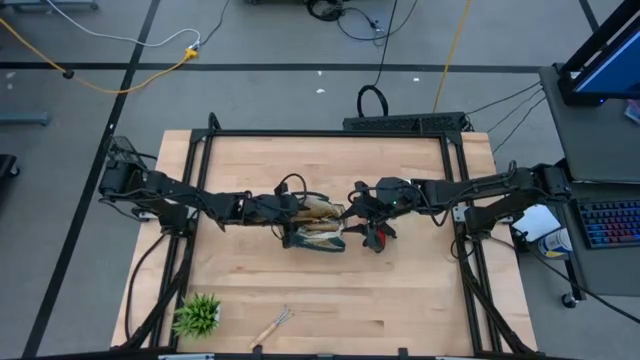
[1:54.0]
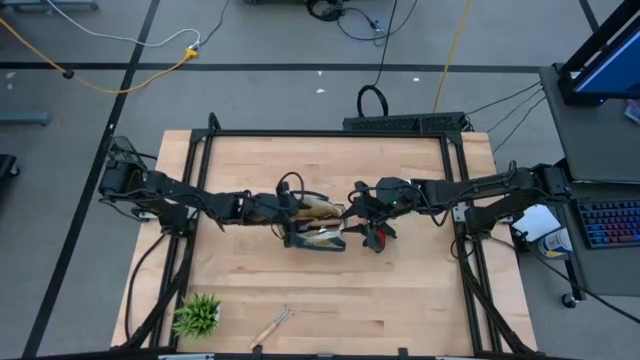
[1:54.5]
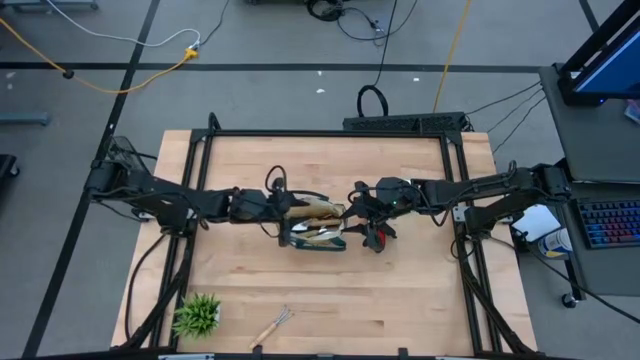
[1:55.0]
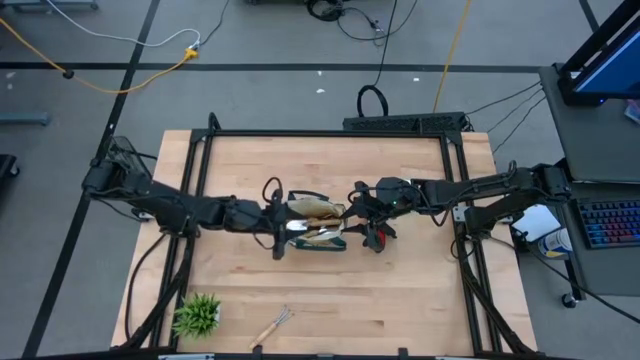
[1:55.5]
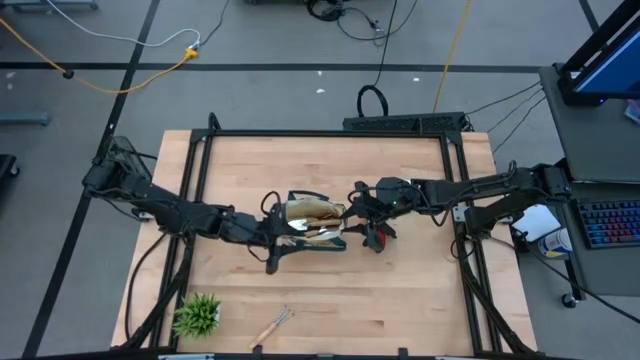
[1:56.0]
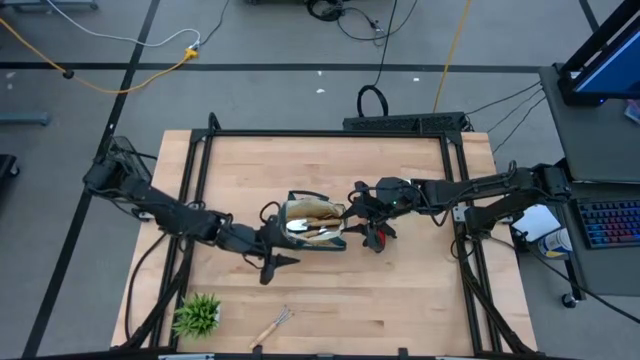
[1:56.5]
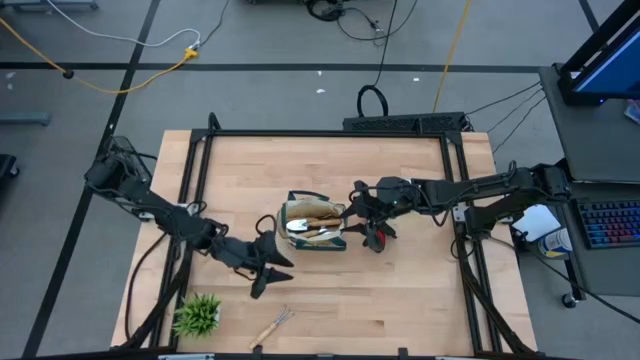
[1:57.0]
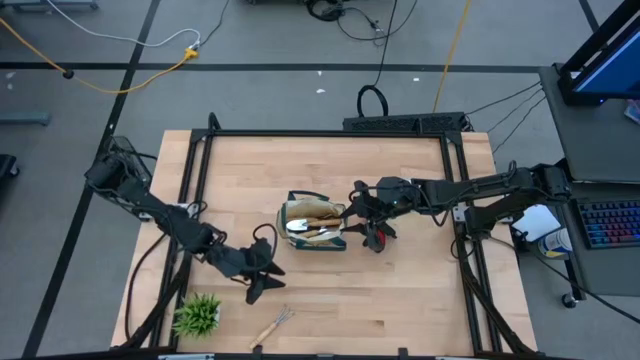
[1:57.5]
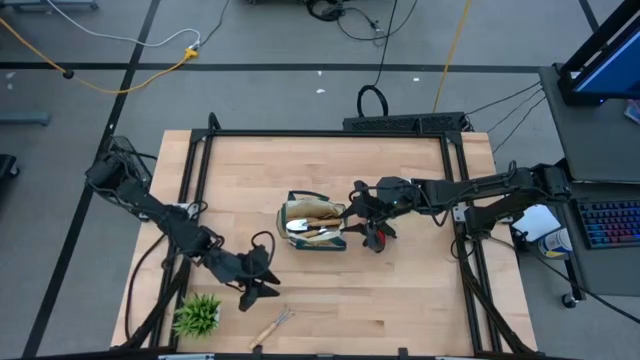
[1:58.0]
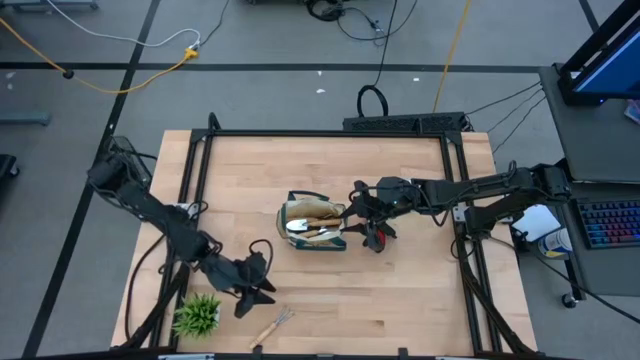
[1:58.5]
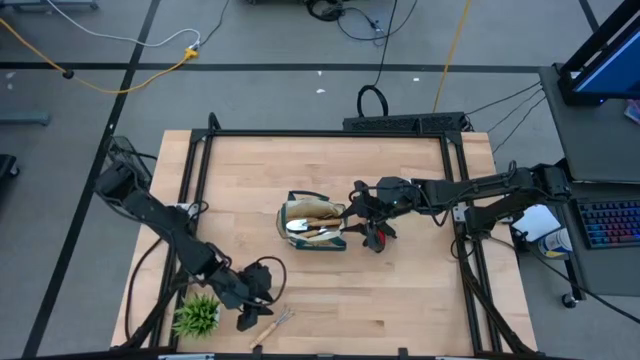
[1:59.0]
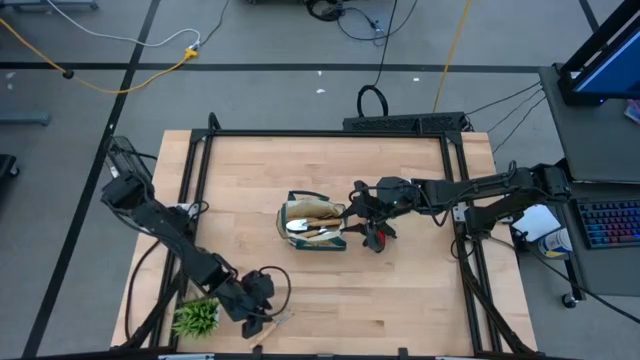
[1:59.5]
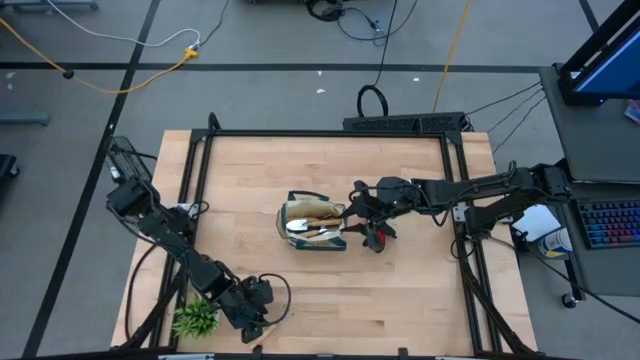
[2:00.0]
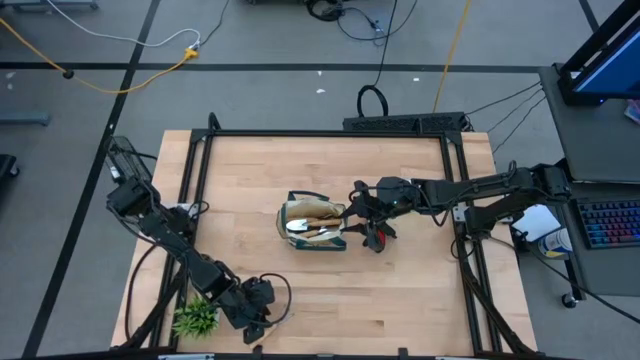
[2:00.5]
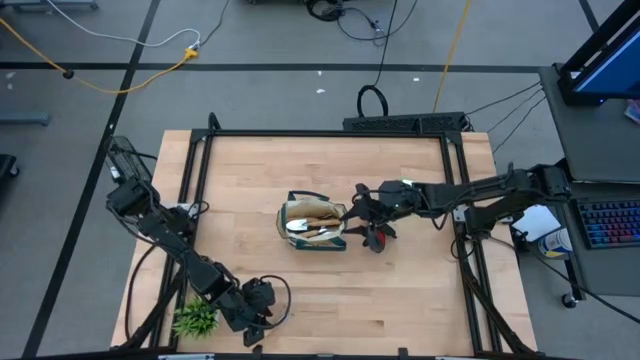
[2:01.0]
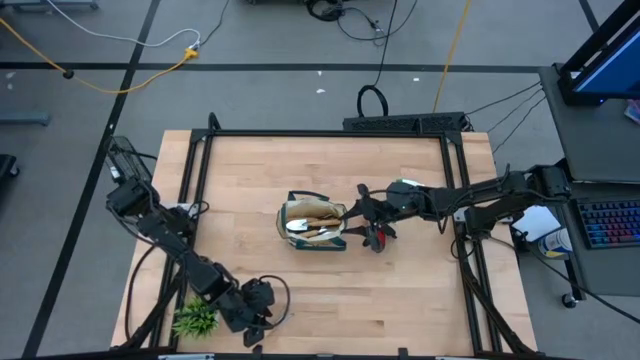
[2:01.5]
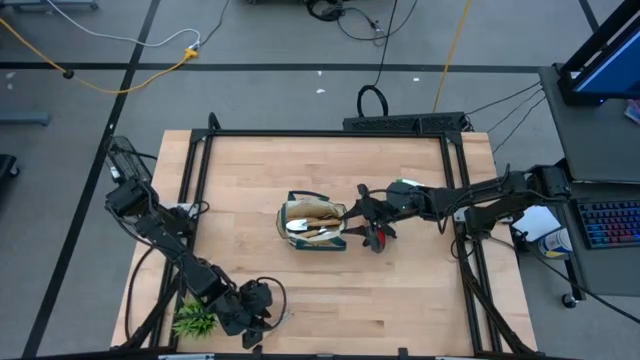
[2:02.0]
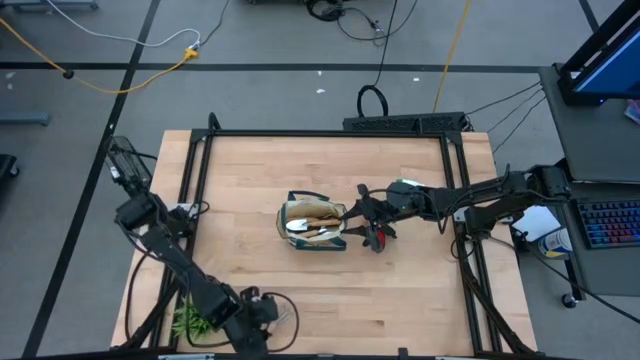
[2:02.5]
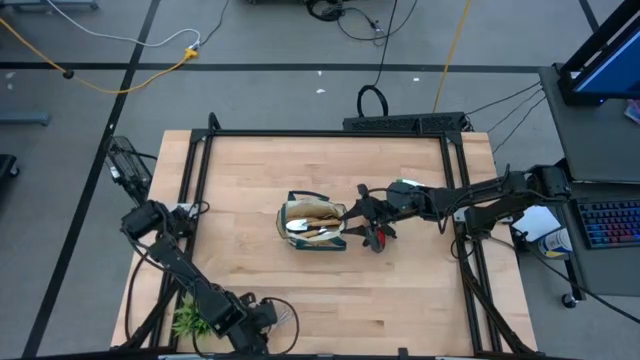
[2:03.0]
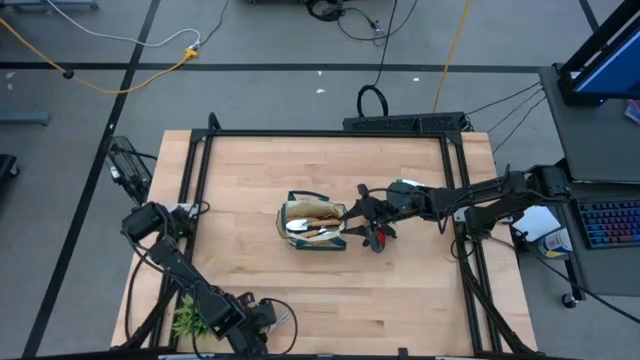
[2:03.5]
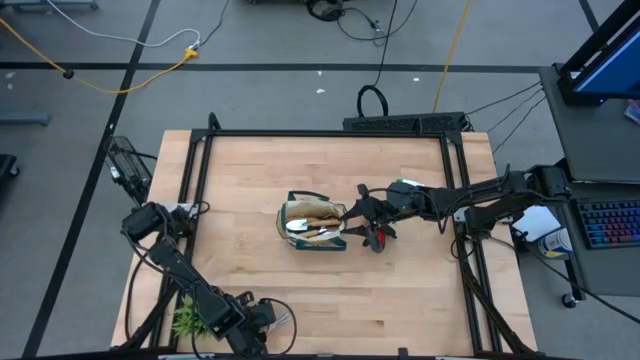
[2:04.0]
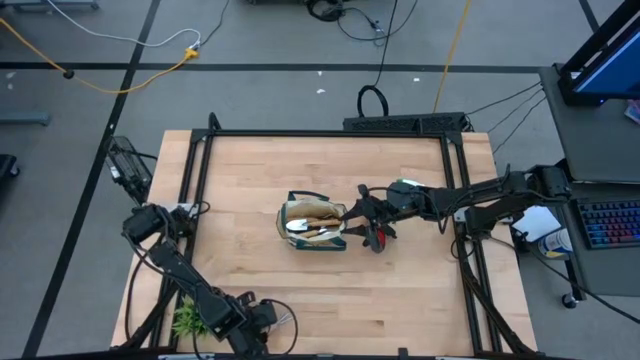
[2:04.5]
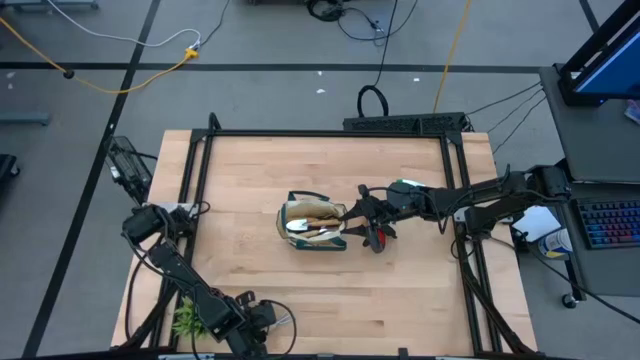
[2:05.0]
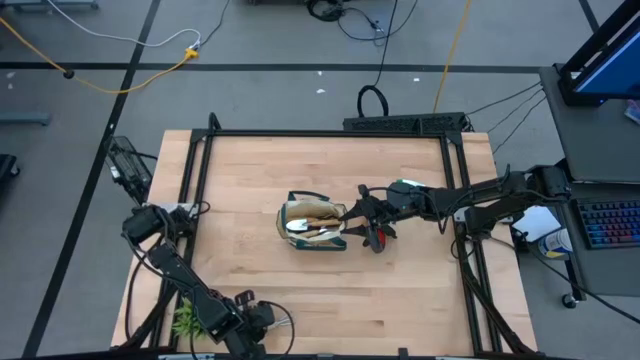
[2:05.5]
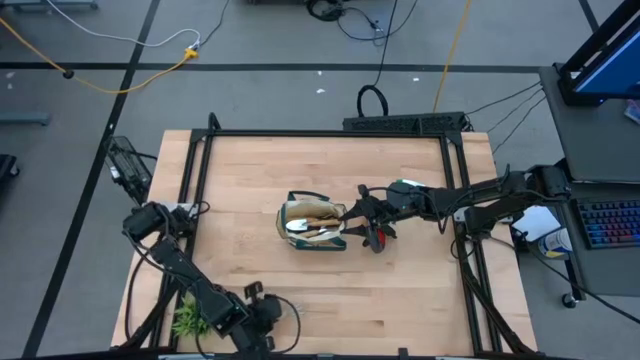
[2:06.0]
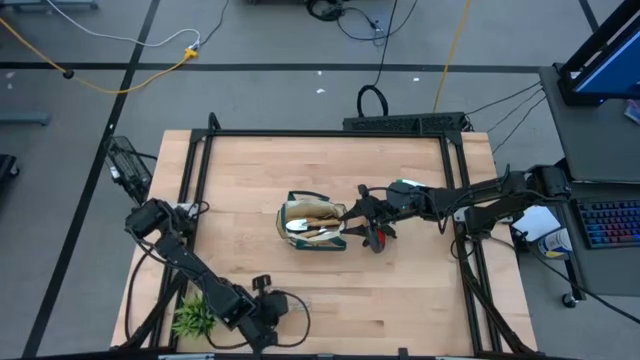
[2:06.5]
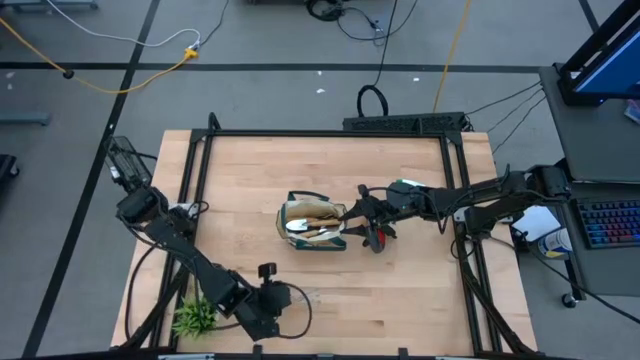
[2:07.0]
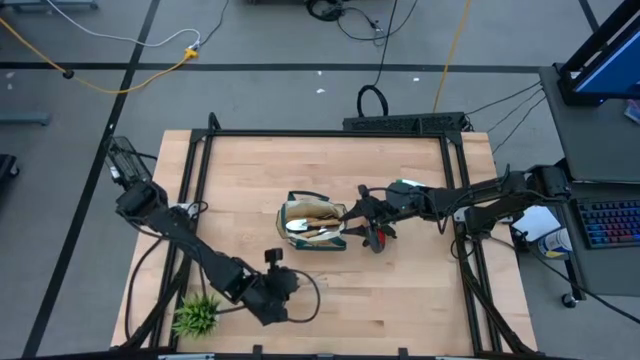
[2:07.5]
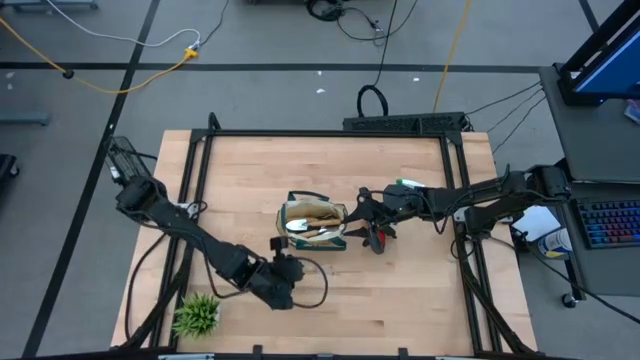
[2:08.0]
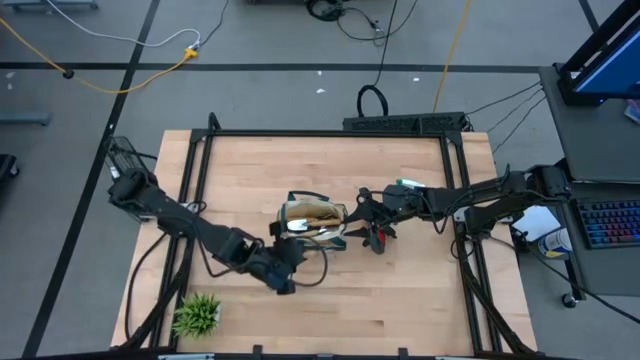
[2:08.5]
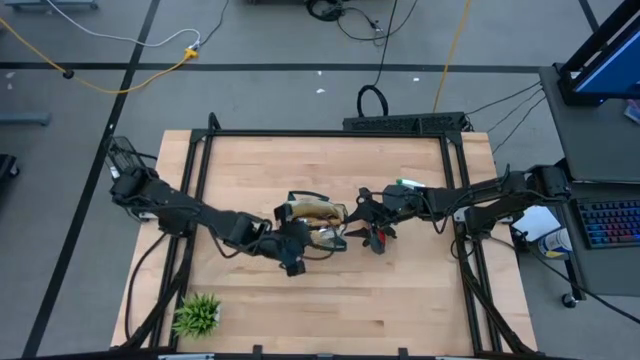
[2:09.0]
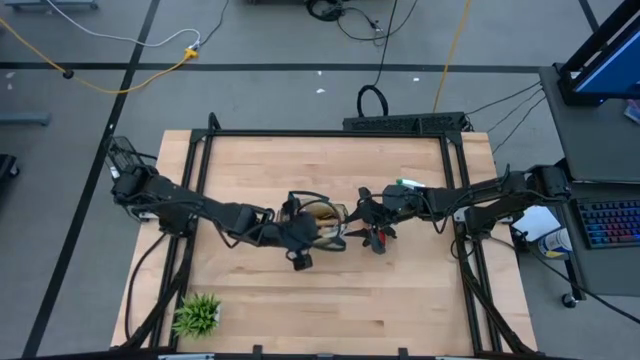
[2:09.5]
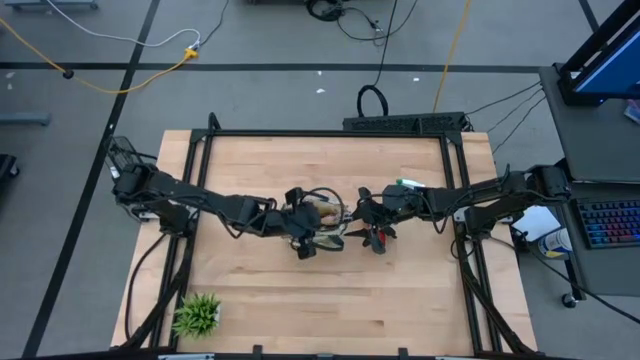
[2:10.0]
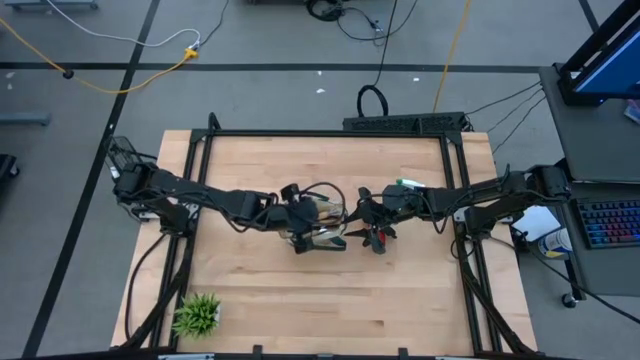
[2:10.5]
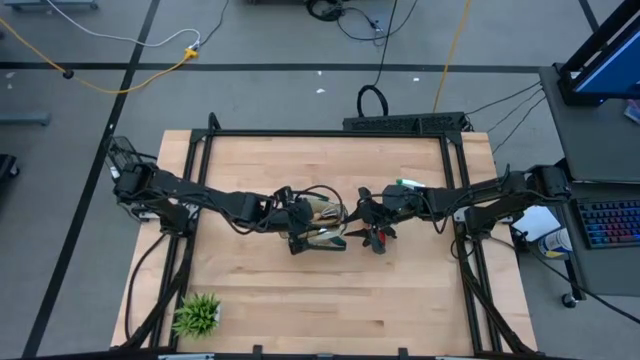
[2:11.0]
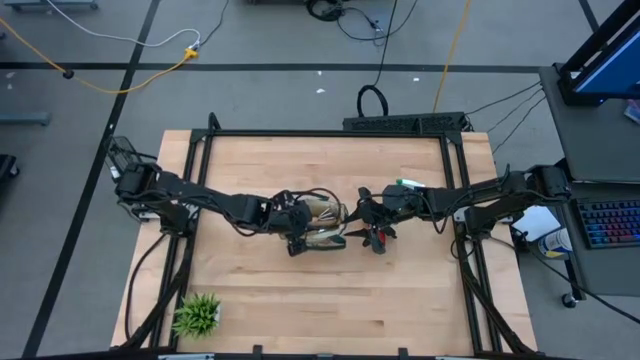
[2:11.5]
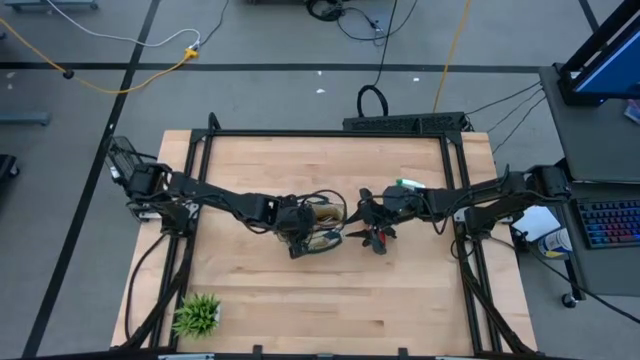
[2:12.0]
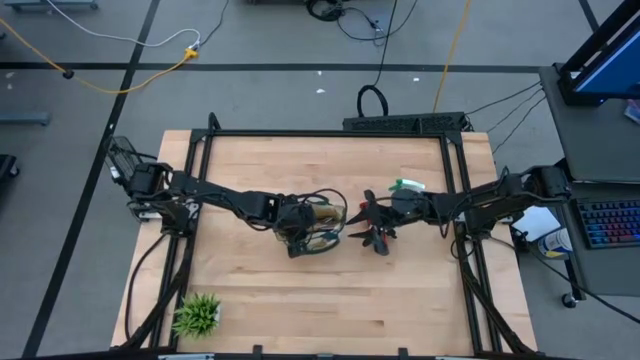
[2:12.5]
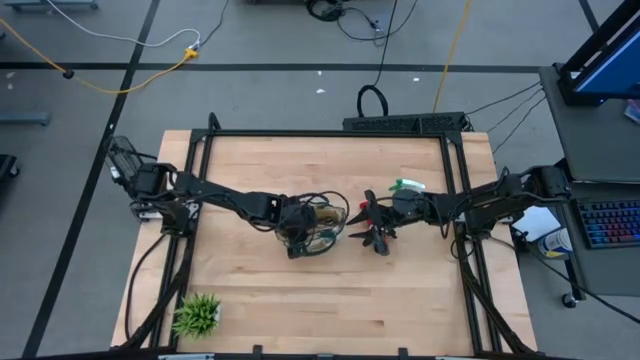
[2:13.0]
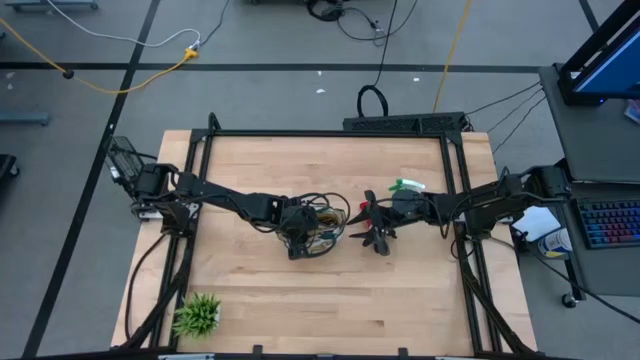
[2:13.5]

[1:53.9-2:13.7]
Task: Pick & Place Garden tools in Gardening bag
Put the brown hand rake into the green gardening bag

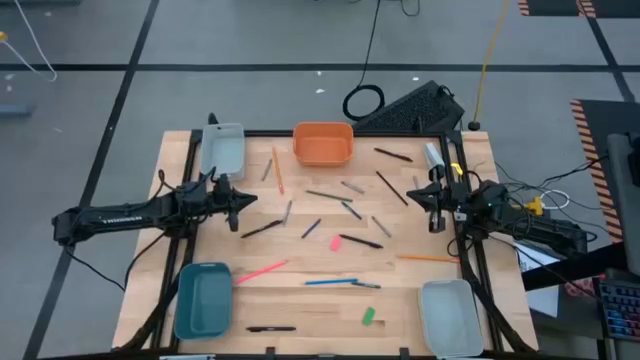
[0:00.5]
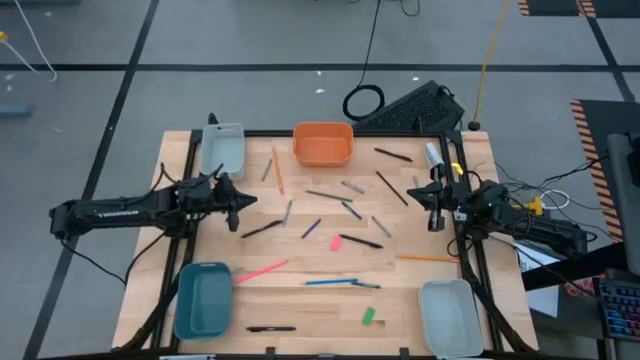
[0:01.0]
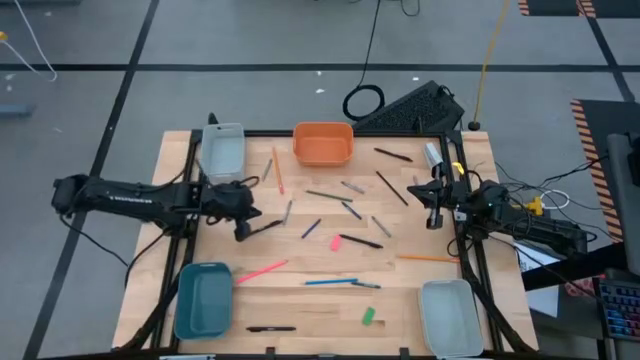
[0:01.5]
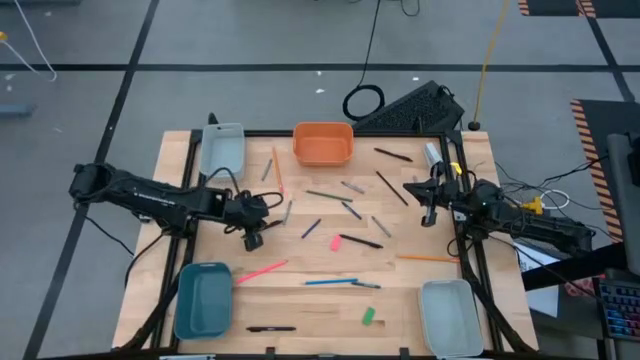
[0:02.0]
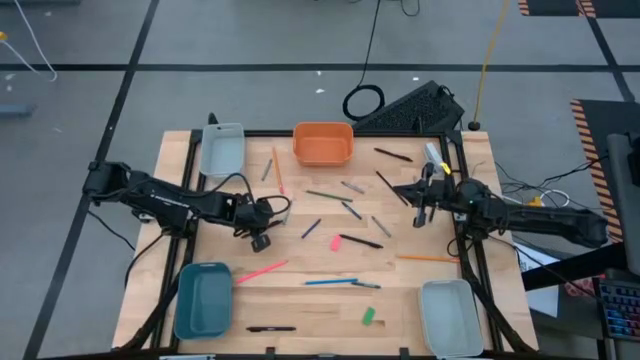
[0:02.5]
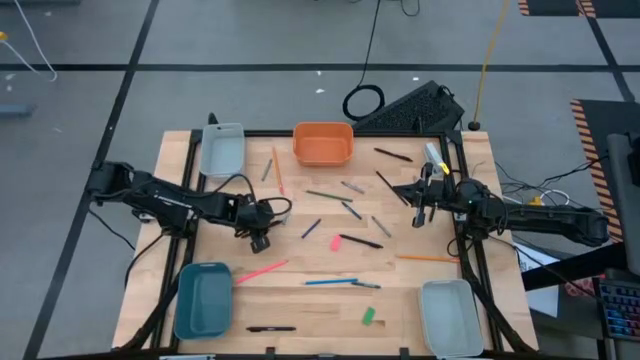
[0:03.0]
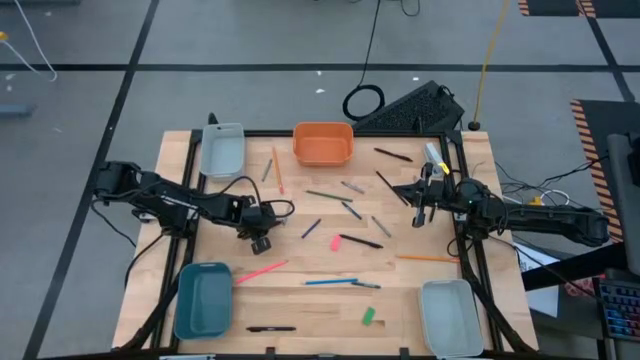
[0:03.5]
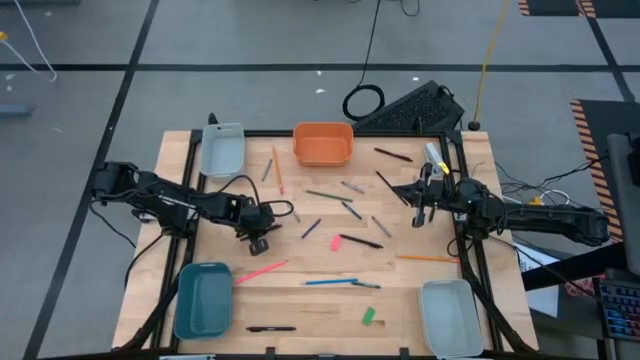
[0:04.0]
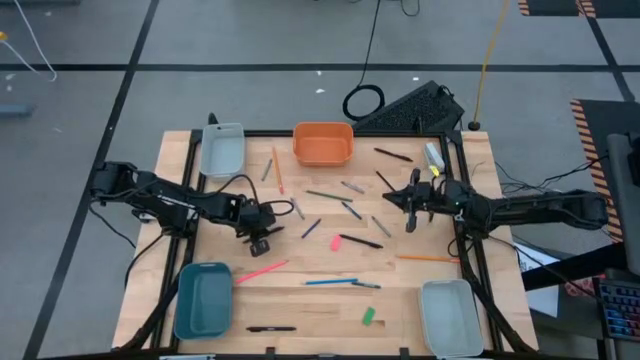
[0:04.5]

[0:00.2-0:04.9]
Task: Sort crayons/erasers/pens/pencils in bins
Put the black pen into the orange bin
